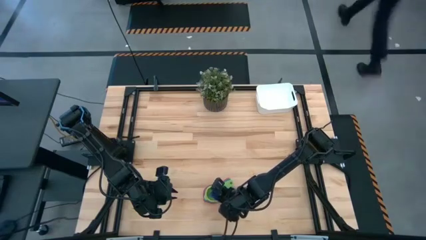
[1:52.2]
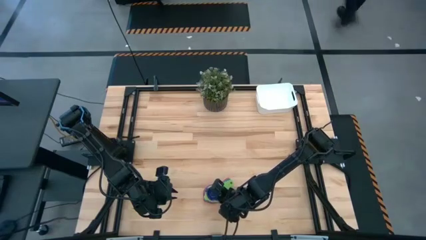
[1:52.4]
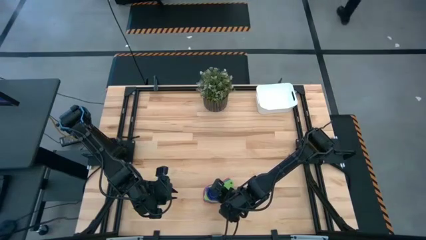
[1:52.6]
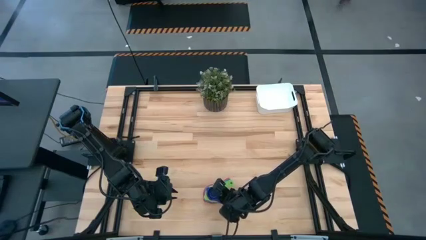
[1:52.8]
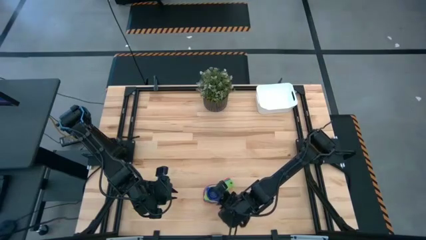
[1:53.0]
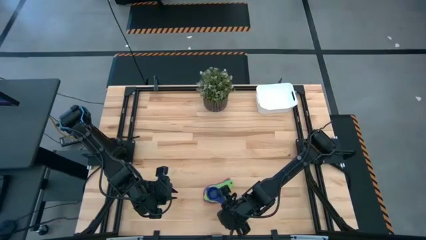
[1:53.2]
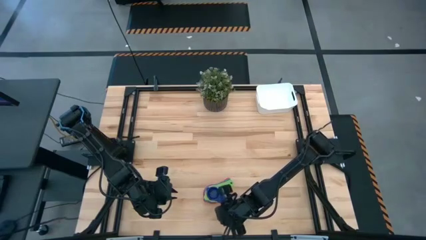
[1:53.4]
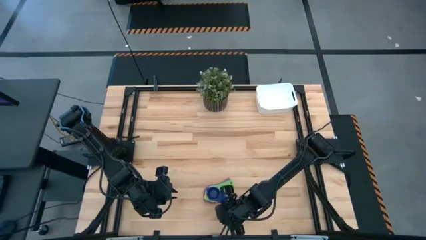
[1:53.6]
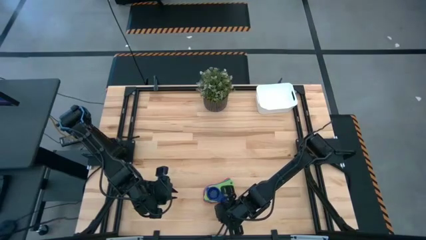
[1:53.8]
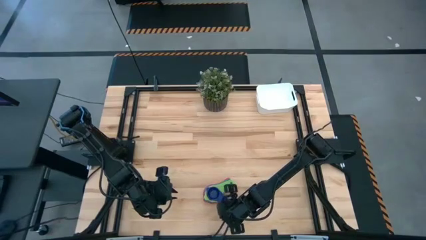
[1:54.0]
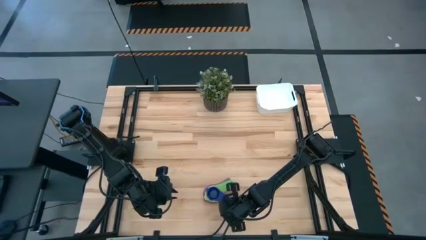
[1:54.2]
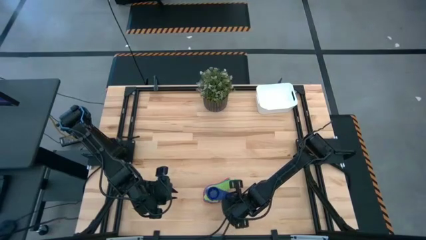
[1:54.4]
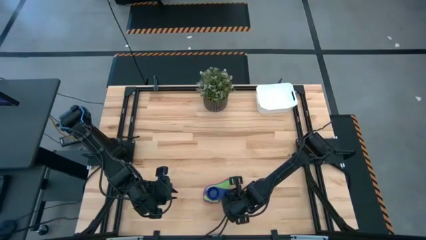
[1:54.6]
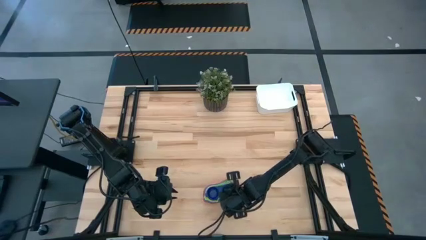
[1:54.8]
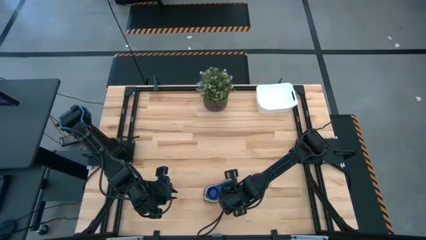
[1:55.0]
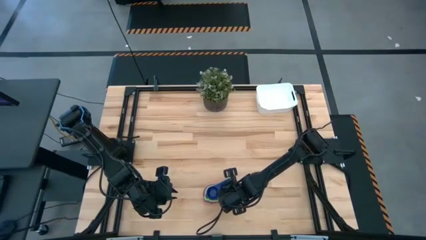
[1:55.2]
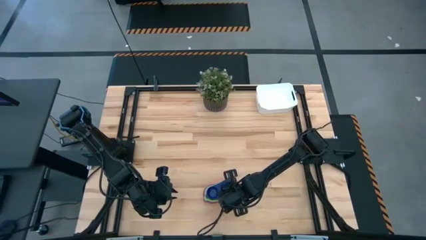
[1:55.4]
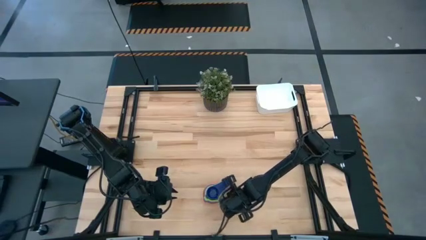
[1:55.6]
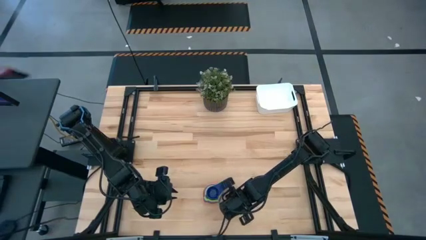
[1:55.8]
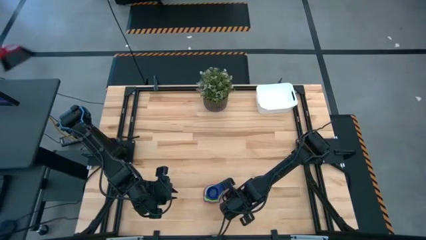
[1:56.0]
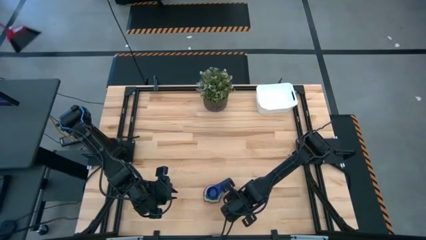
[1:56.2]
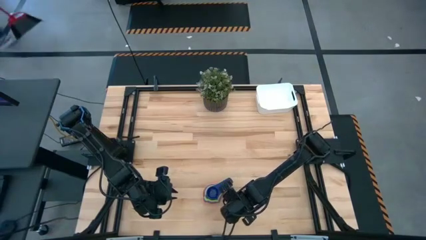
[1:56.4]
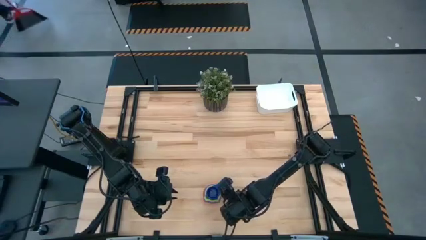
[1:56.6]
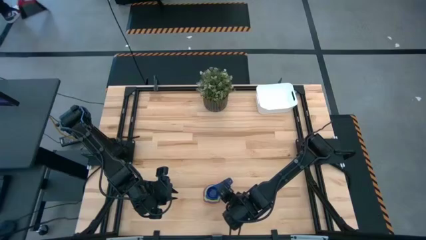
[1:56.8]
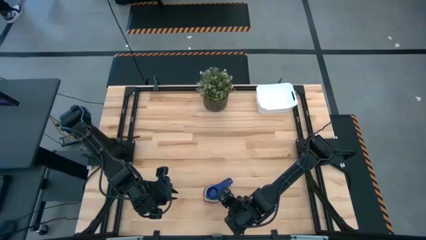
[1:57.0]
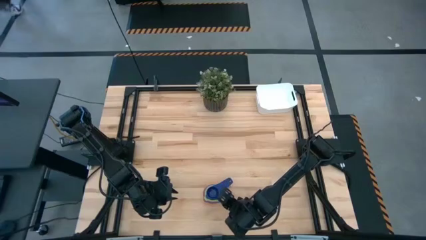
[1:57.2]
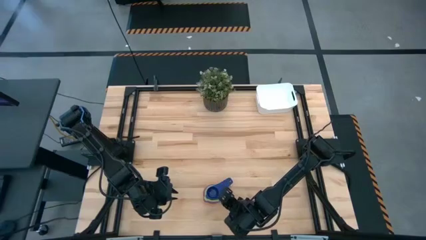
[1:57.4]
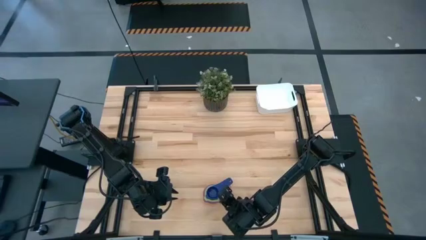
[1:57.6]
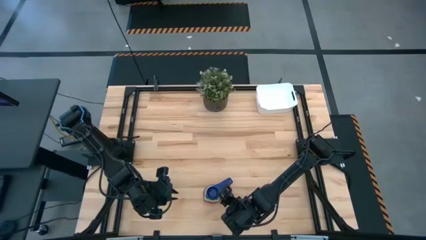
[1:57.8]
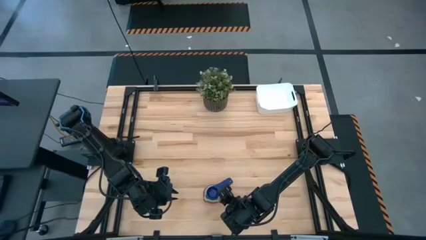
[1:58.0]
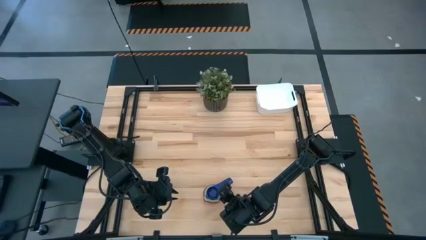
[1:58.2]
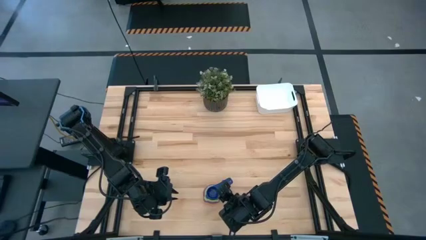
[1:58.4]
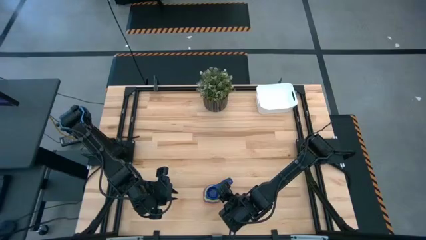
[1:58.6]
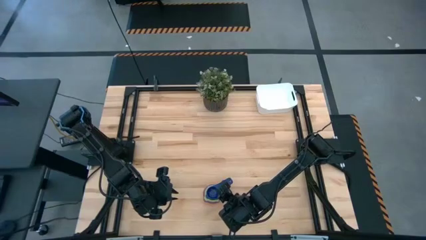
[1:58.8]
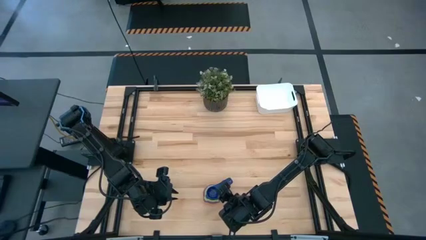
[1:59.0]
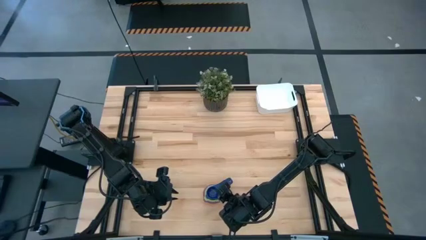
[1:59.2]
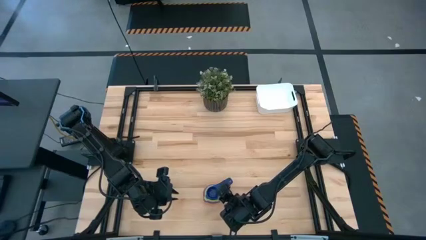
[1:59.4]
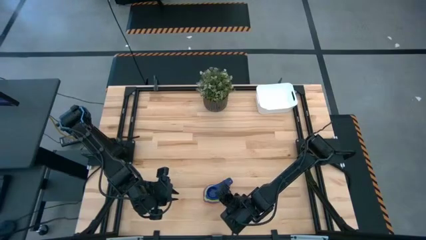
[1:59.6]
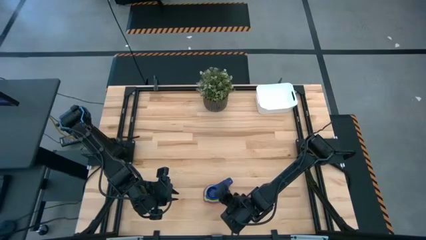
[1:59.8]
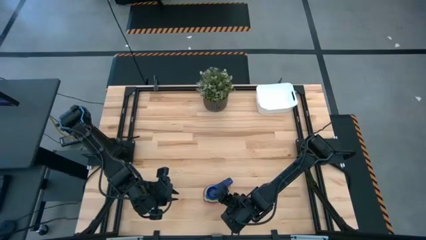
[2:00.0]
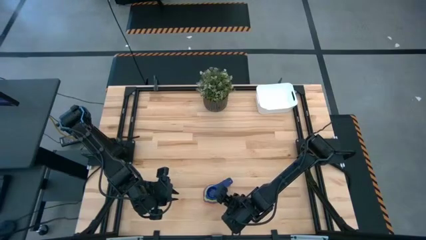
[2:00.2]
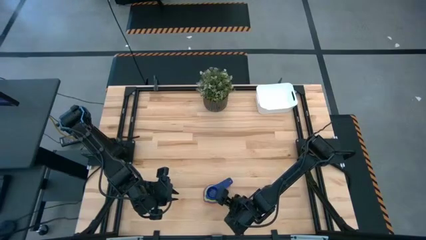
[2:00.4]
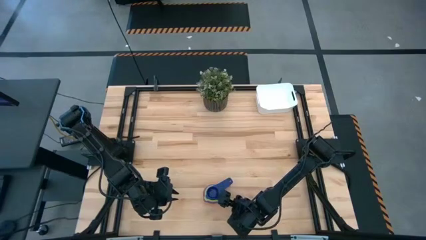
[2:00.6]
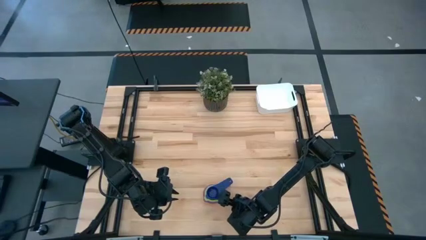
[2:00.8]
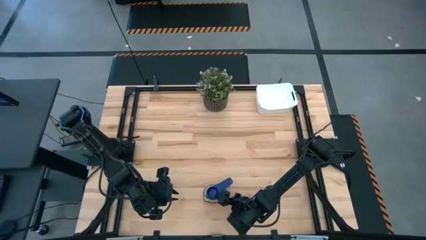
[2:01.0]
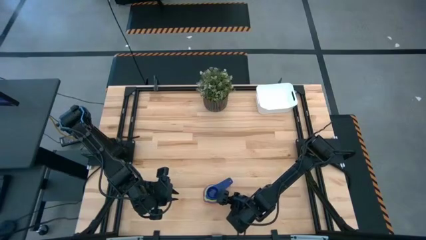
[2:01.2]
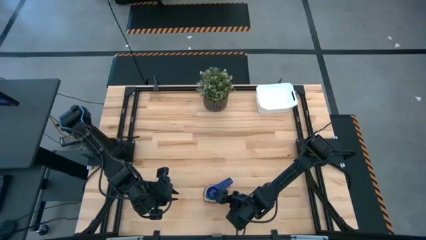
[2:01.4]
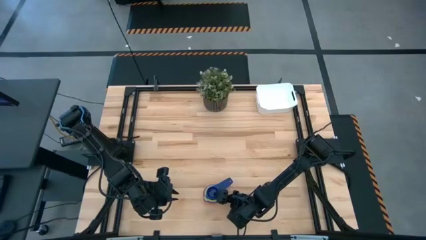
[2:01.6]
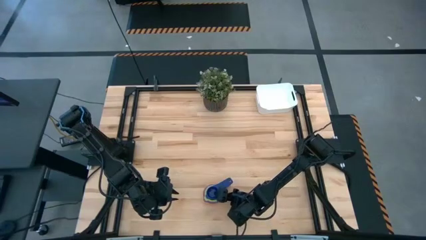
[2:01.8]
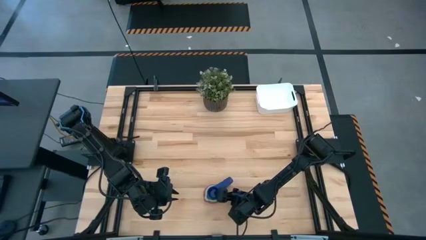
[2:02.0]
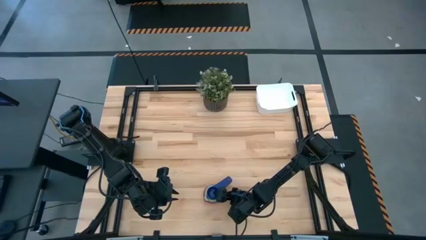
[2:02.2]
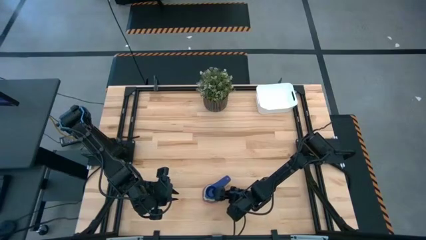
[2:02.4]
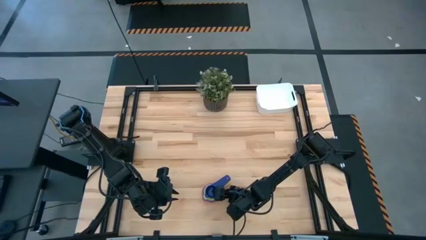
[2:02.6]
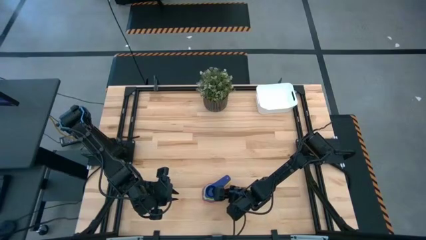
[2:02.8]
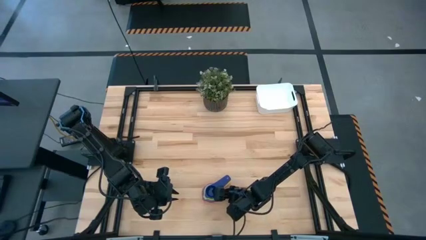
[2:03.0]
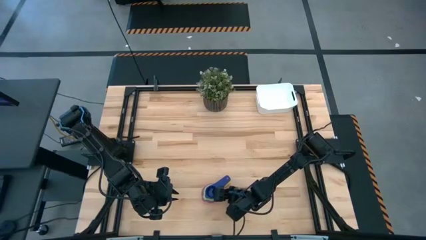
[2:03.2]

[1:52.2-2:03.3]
Task: Nest measuring cups in basket
Put the stacked measuring cups into the white bin
